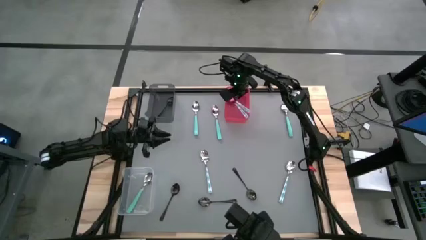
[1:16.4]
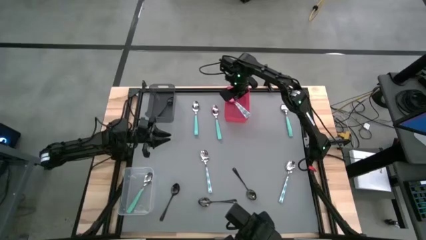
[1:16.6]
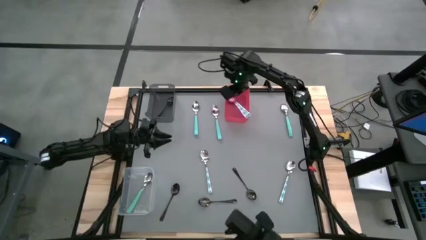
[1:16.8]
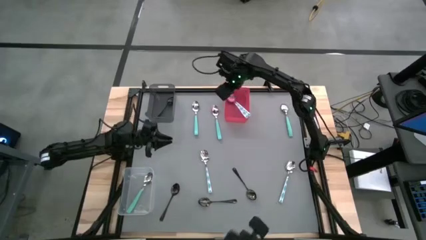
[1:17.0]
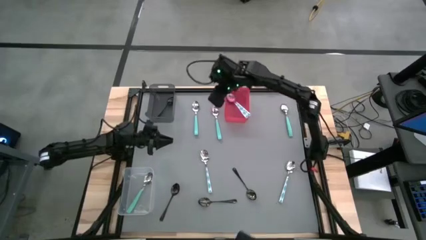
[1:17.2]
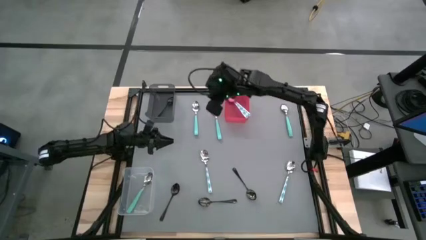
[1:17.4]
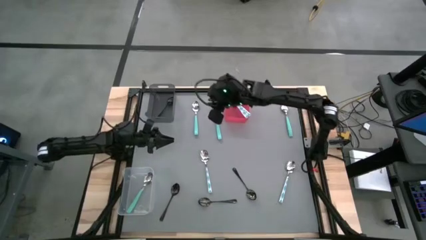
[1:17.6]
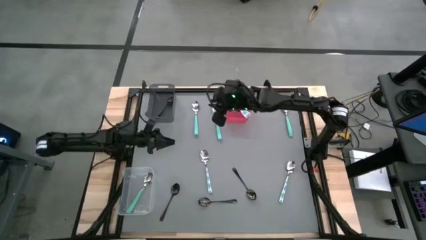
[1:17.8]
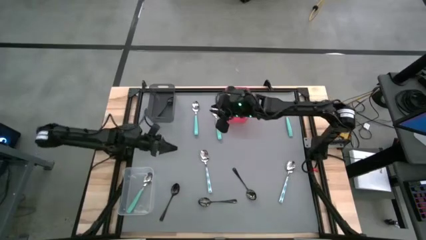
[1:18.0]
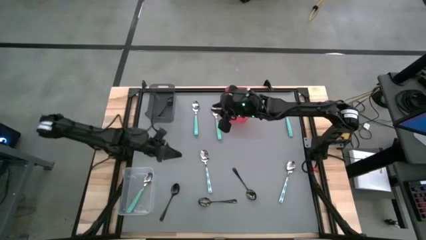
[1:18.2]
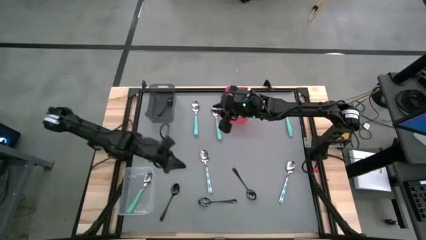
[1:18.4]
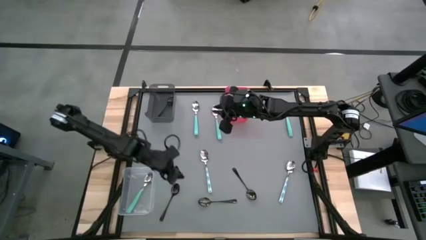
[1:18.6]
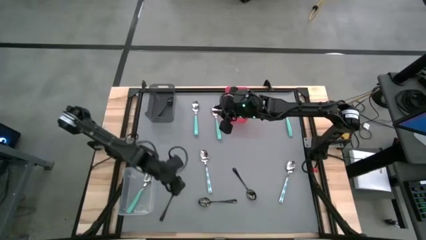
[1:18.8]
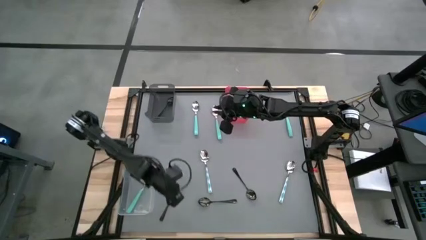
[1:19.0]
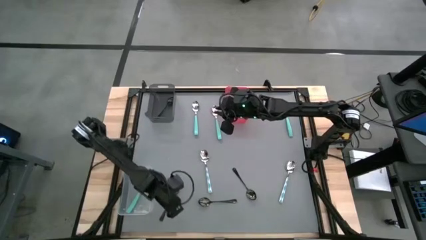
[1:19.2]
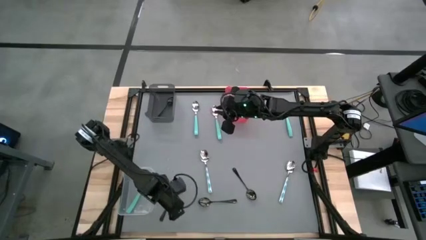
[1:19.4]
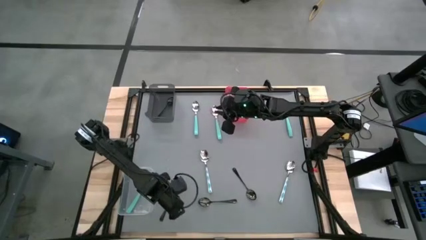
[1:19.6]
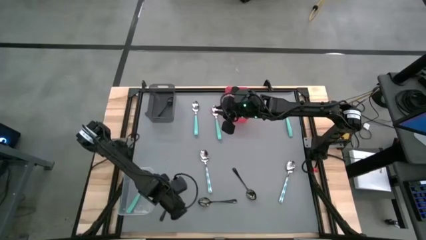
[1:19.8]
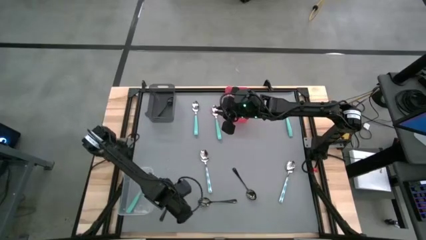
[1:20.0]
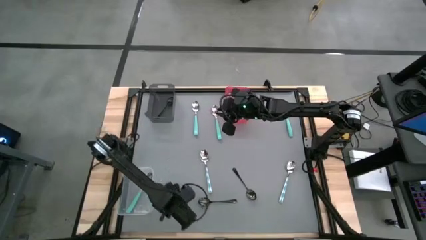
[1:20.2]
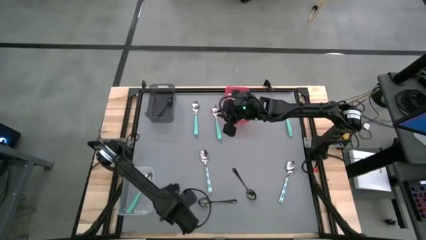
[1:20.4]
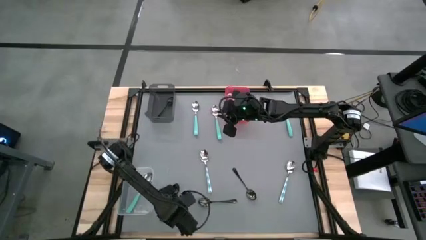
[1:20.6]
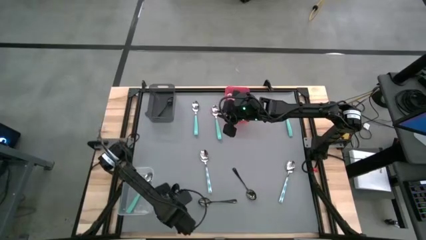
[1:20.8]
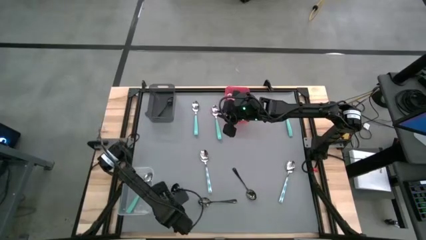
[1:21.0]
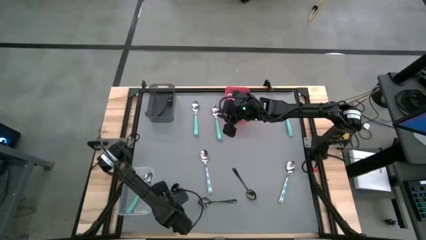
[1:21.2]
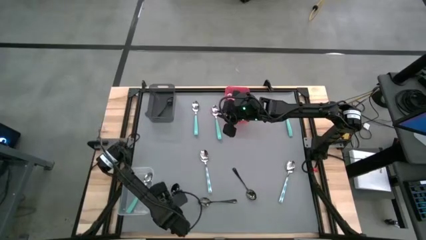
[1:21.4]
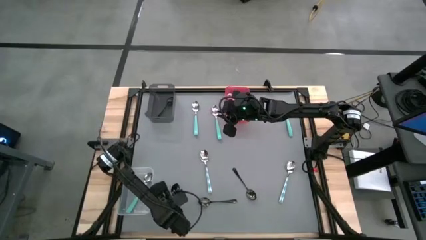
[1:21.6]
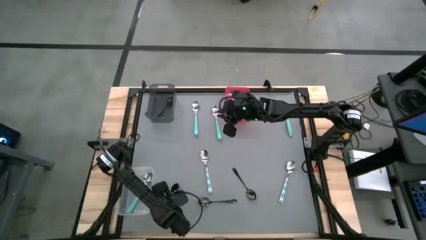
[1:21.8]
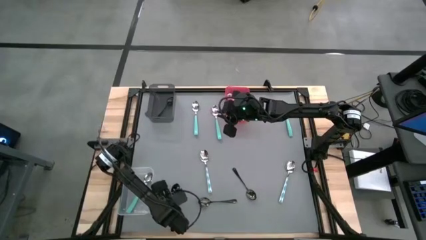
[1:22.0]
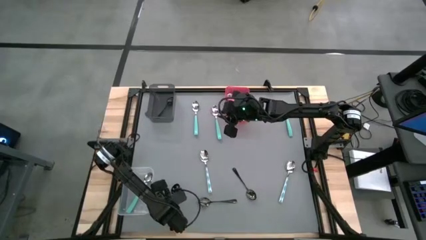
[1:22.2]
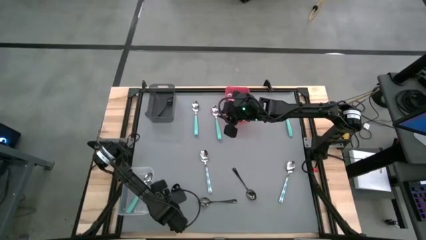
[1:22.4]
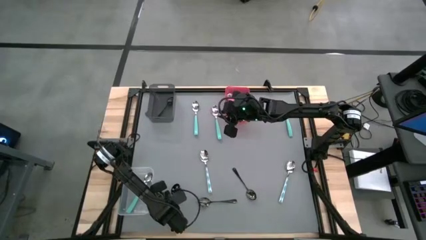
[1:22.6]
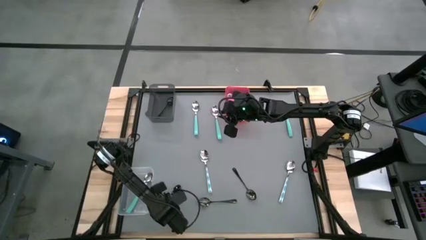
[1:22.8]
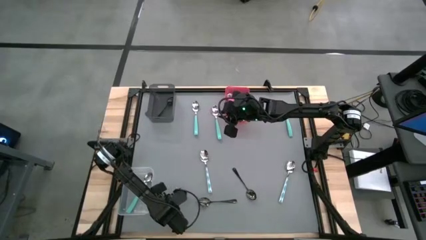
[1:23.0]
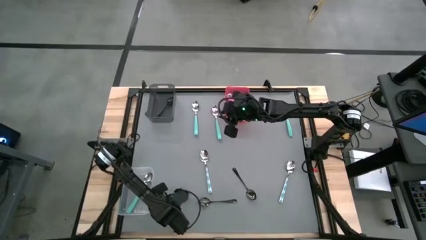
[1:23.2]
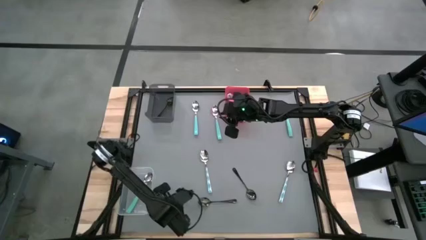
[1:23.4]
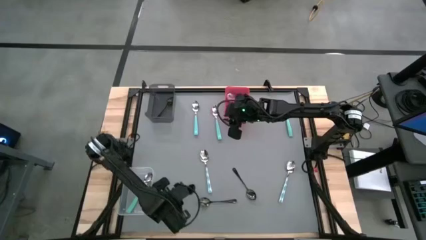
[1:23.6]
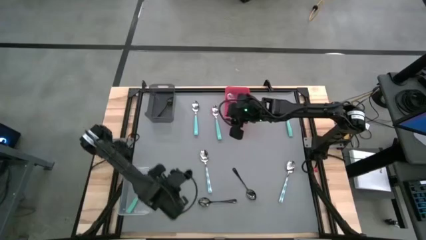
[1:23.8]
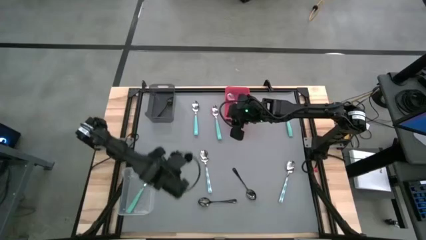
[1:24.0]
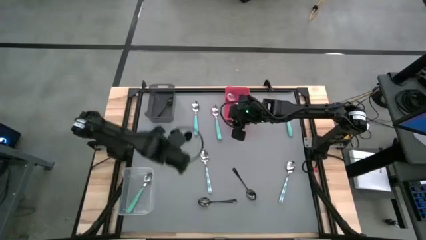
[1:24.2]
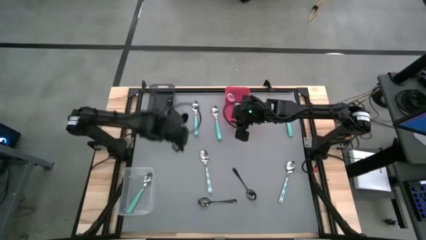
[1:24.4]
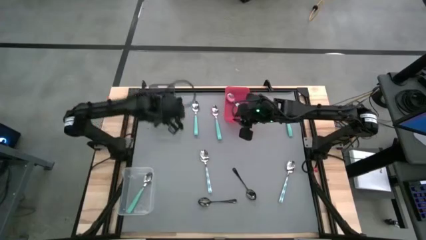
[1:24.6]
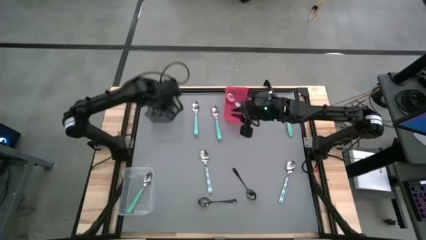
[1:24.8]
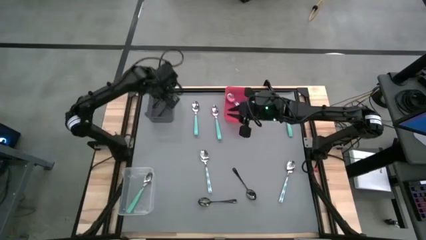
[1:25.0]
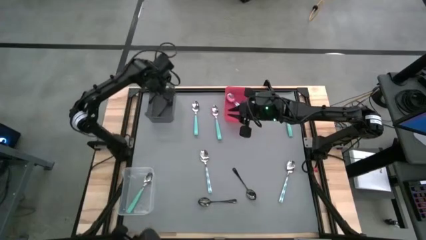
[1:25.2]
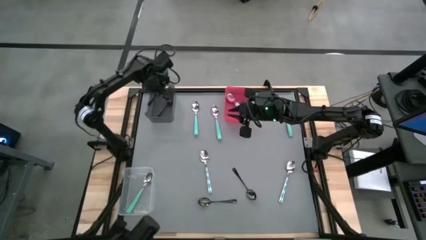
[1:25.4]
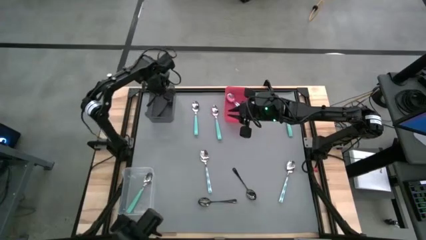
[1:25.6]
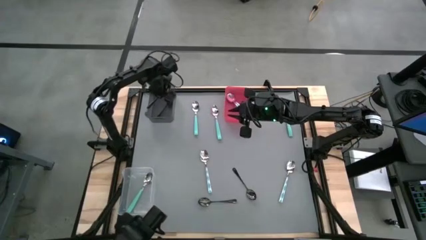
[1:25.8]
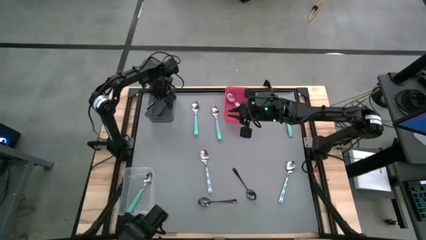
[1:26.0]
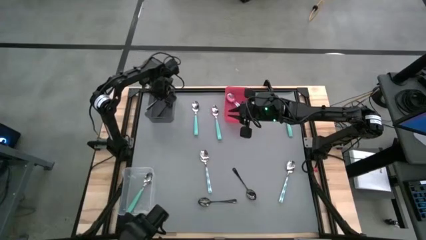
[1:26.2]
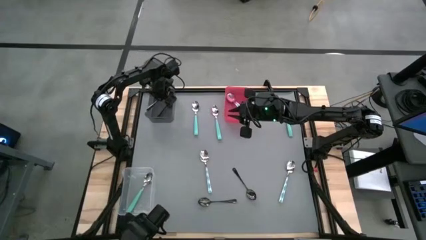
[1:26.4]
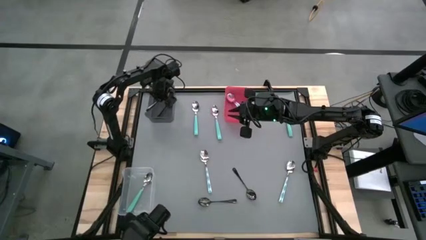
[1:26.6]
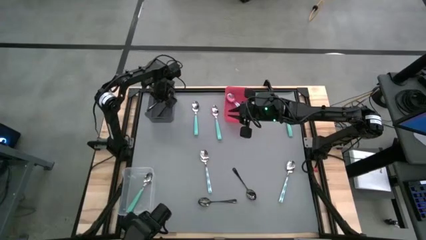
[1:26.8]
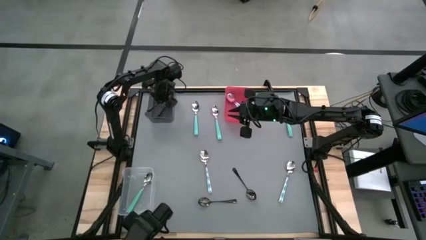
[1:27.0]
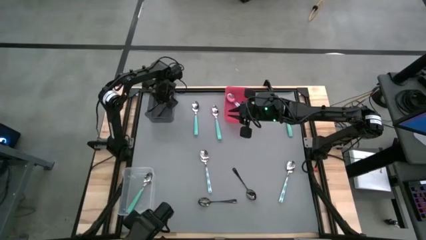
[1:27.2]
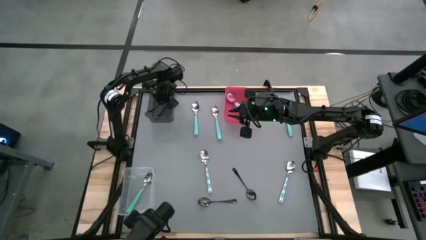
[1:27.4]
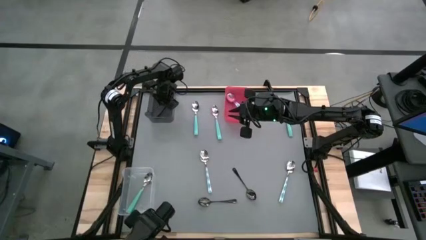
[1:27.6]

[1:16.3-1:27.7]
Task: Sort silverware by color (type)
Put the black spoon into the black bin

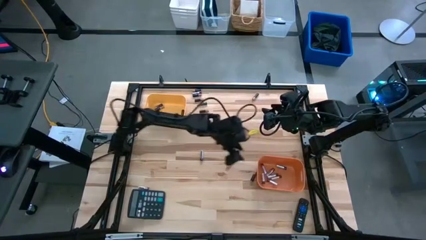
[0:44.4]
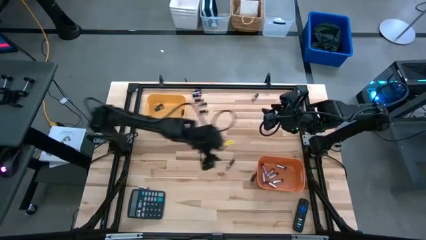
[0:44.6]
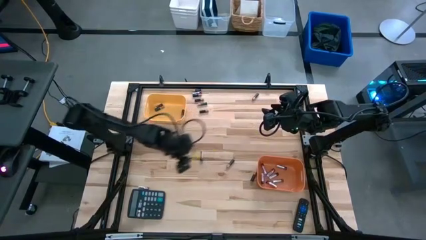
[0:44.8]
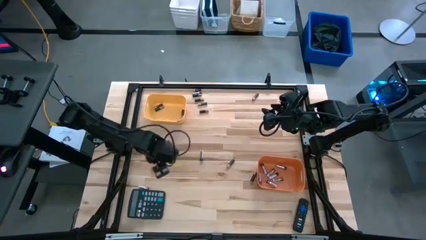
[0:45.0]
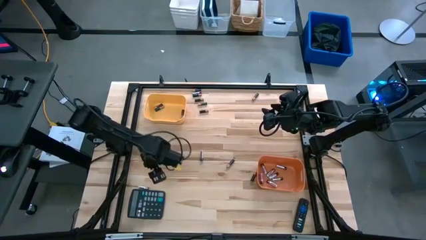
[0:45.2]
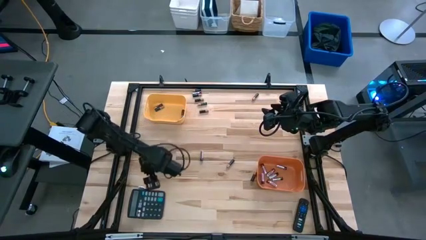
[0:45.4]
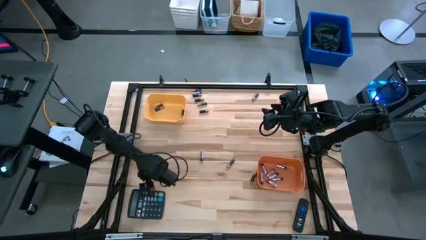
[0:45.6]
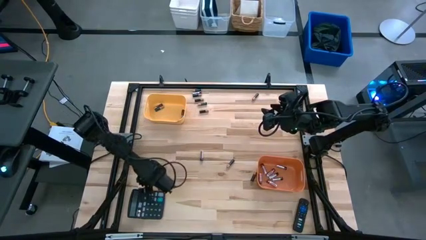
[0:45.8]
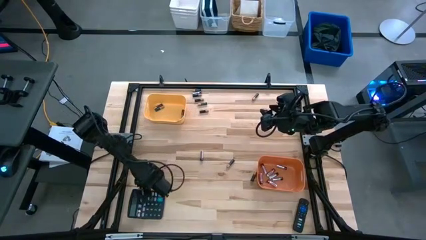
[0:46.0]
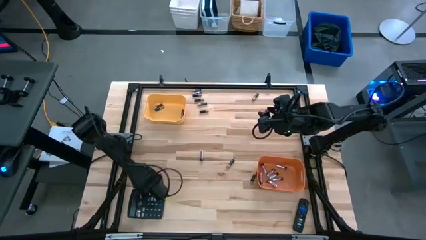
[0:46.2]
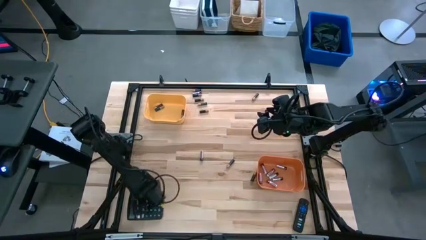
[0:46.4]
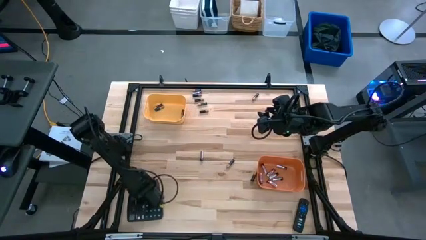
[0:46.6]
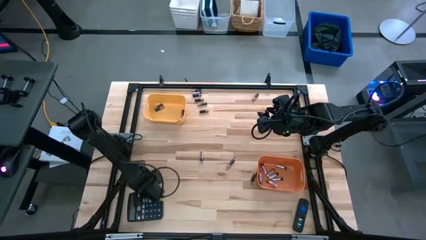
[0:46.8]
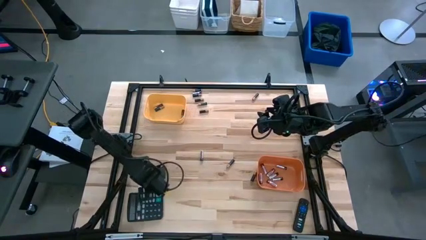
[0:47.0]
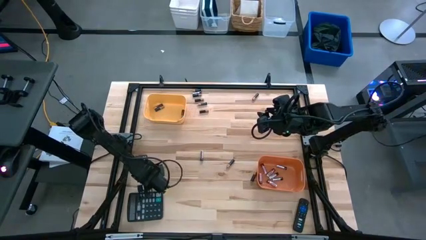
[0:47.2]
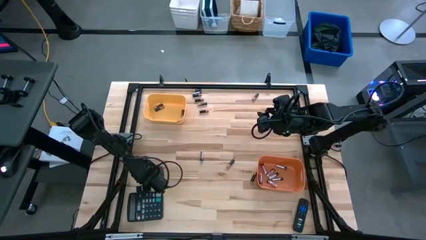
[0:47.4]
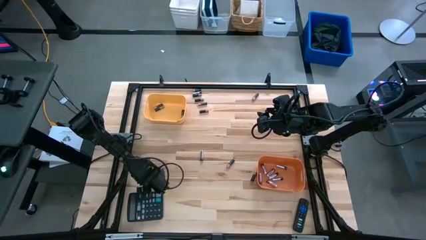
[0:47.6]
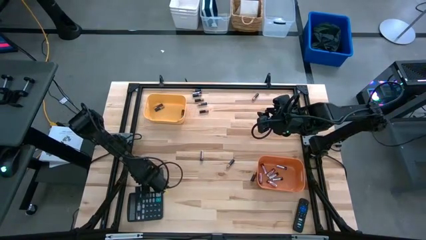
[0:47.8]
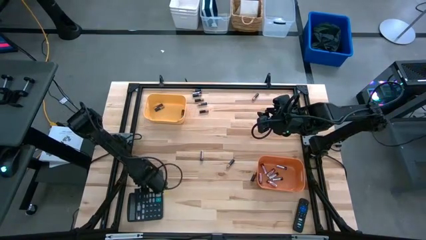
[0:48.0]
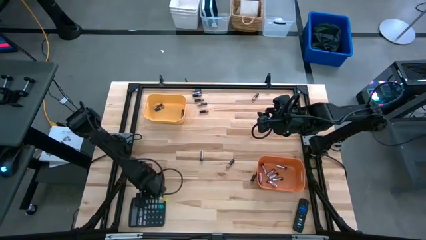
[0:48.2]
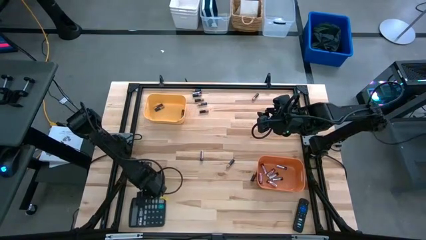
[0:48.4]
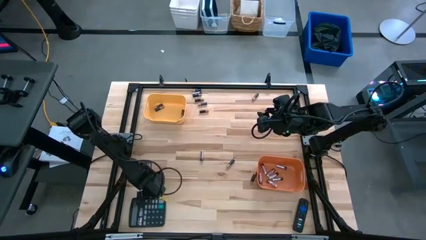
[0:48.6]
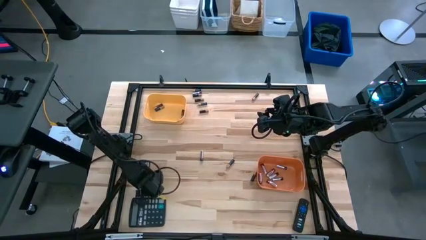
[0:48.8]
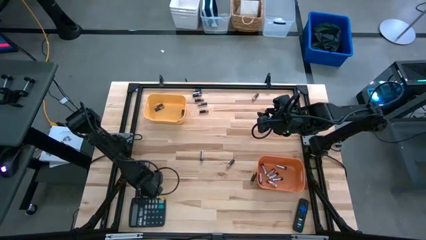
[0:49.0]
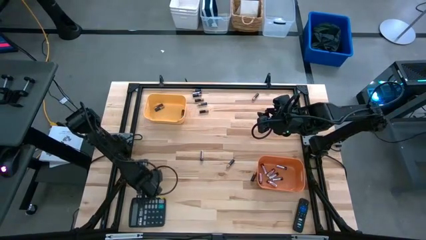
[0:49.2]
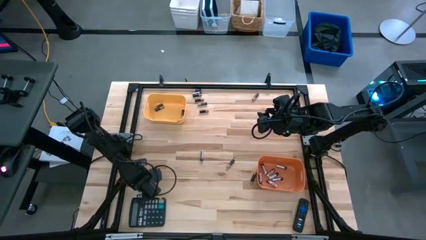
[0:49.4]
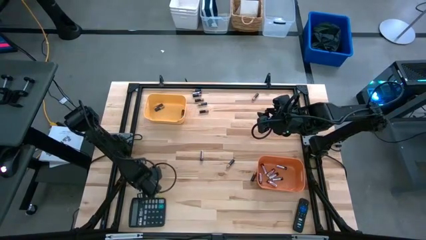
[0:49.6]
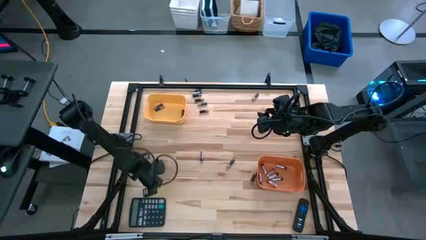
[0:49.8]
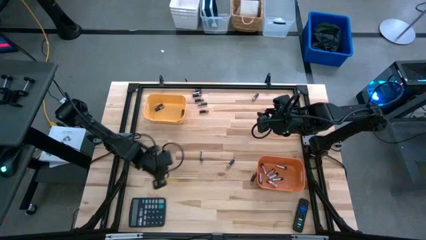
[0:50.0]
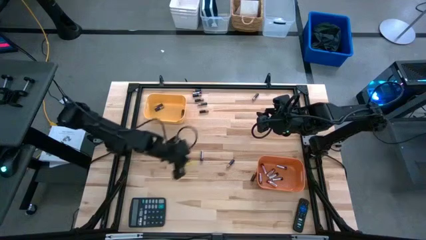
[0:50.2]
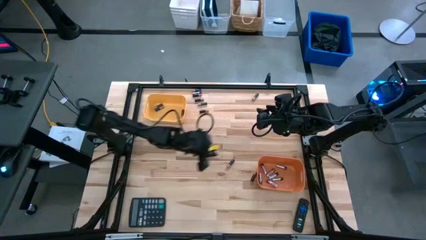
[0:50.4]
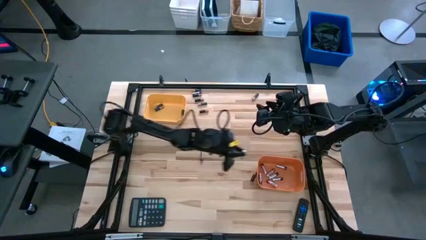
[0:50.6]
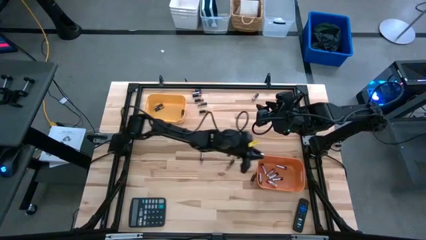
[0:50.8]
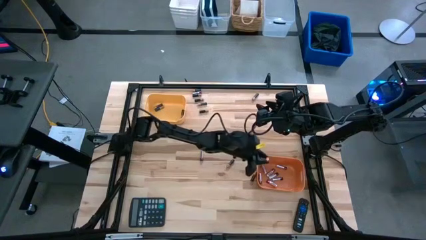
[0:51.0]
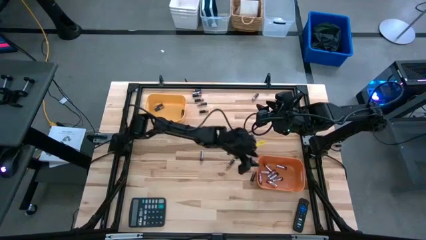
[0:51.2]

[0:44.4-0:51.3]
Task: Sort batteries
Put the silver battery into the orange bin
